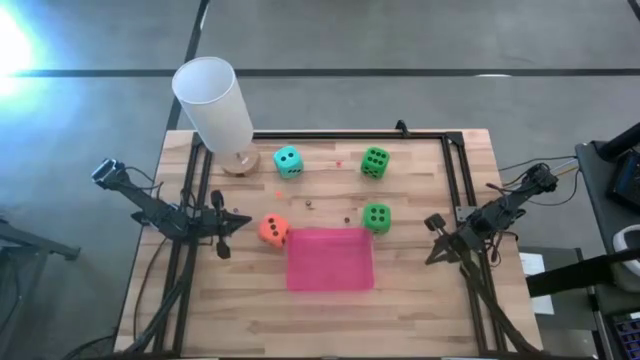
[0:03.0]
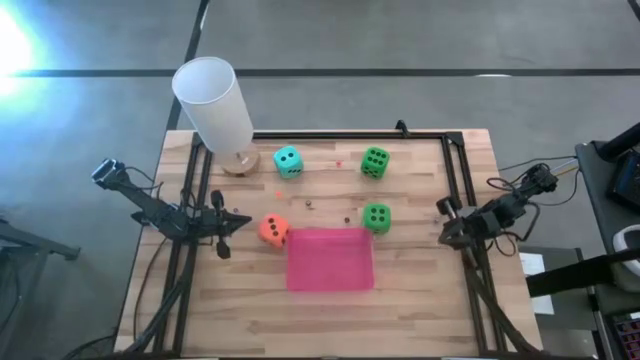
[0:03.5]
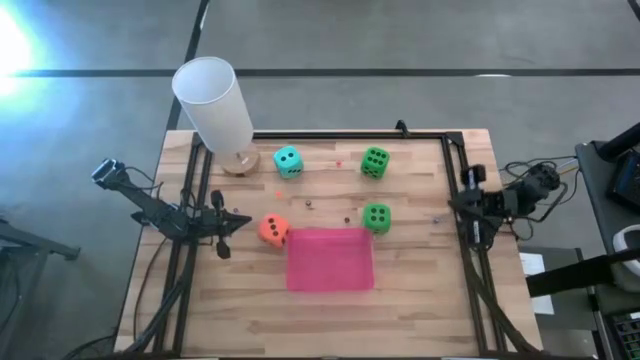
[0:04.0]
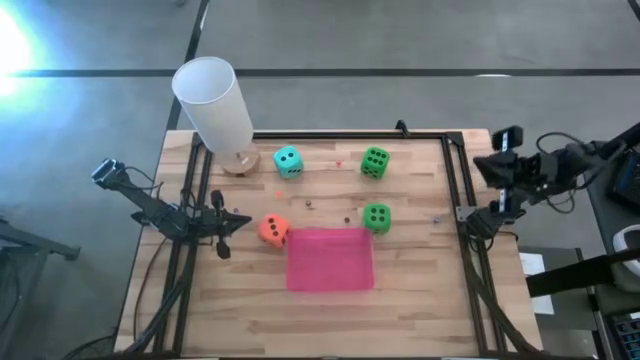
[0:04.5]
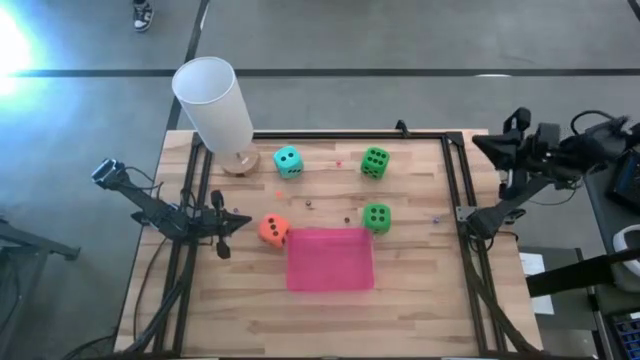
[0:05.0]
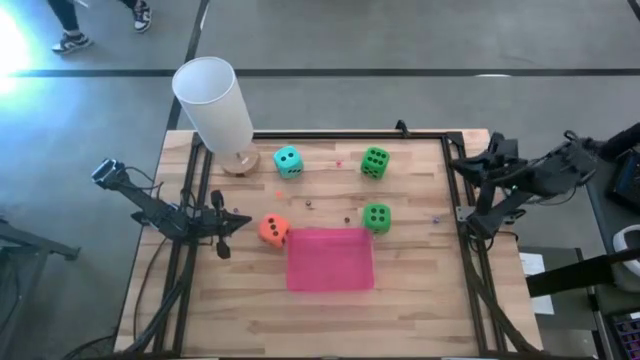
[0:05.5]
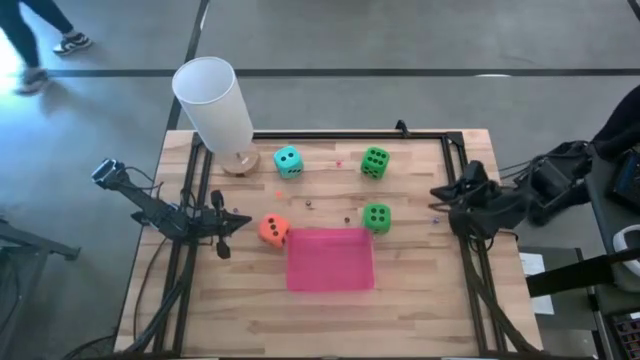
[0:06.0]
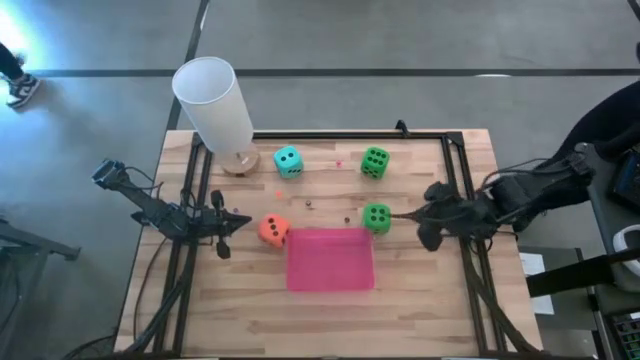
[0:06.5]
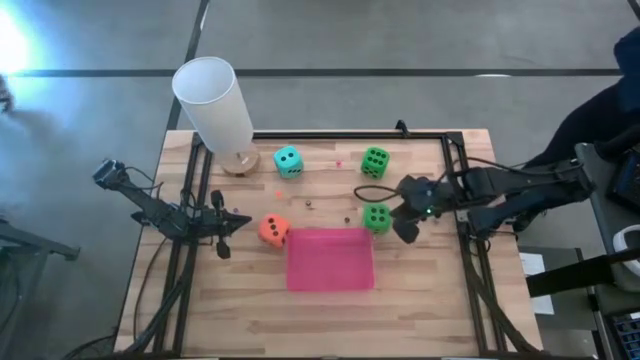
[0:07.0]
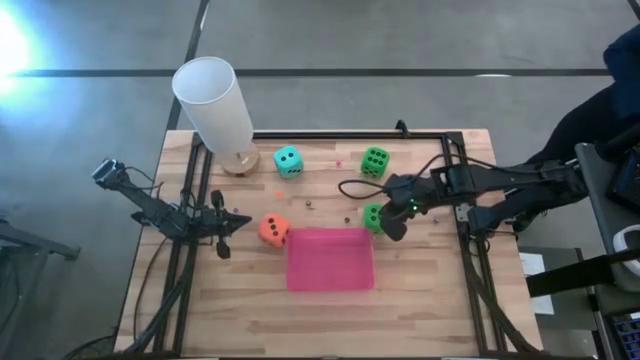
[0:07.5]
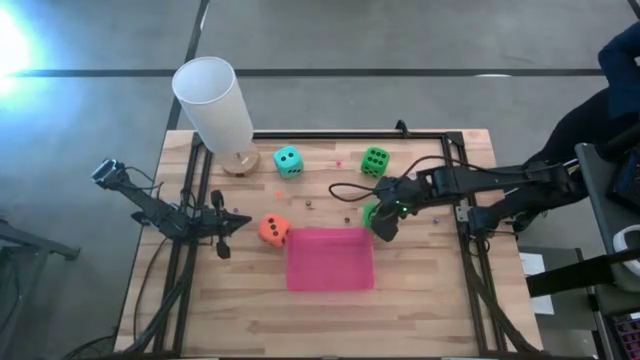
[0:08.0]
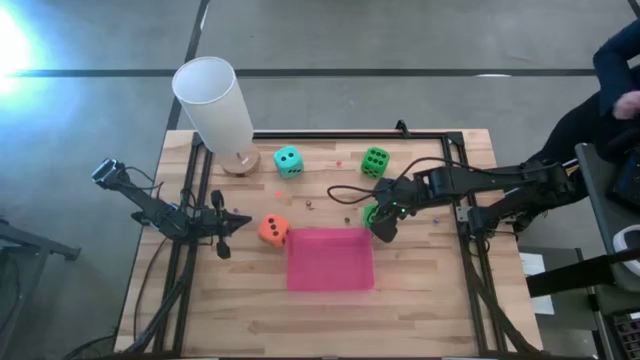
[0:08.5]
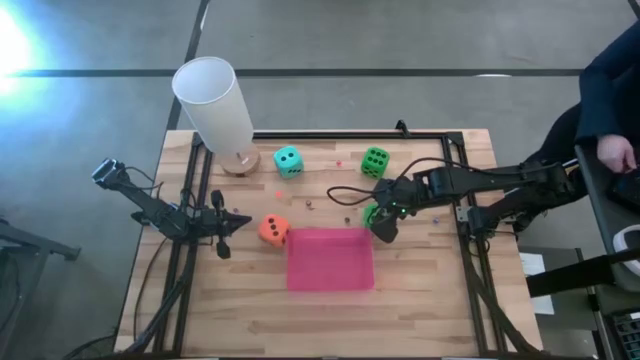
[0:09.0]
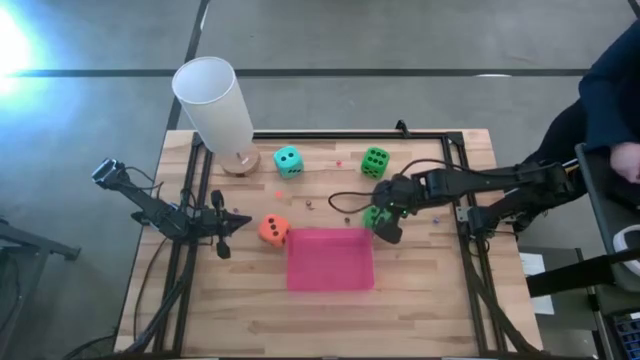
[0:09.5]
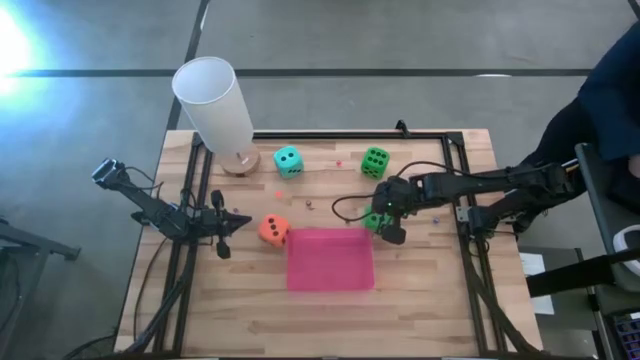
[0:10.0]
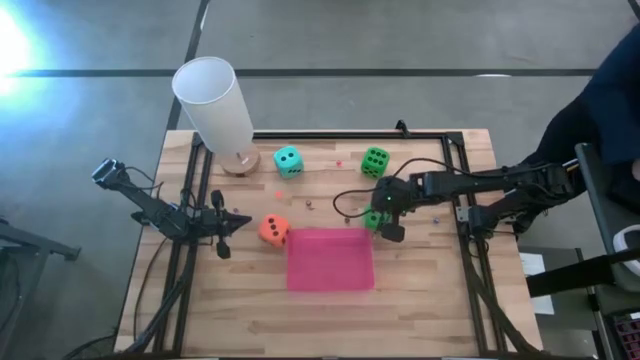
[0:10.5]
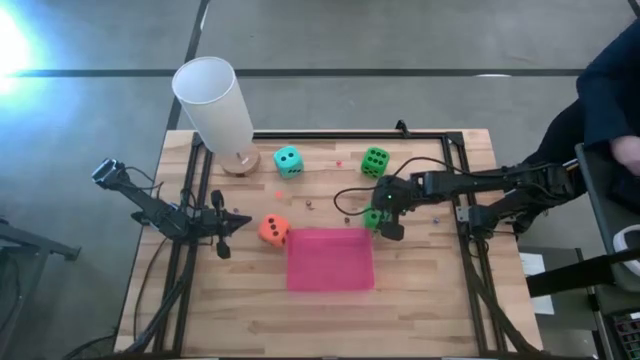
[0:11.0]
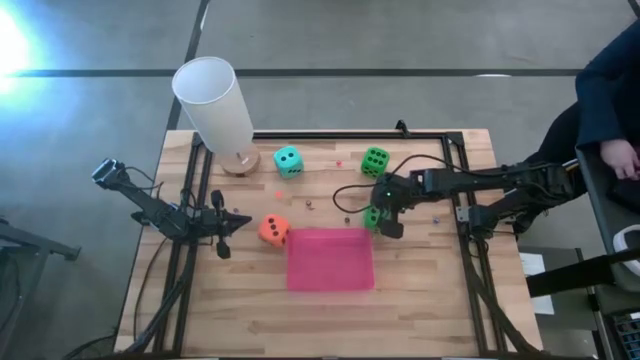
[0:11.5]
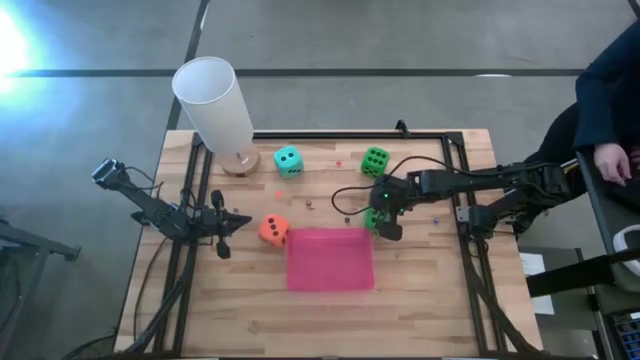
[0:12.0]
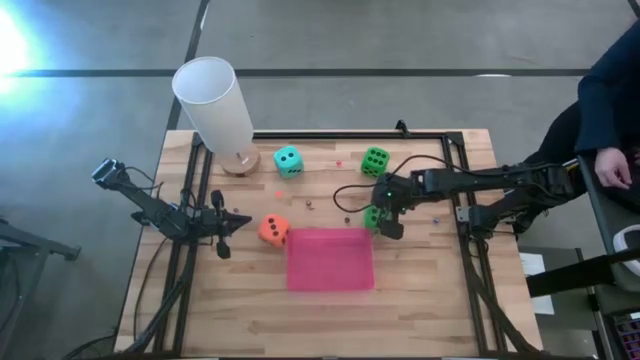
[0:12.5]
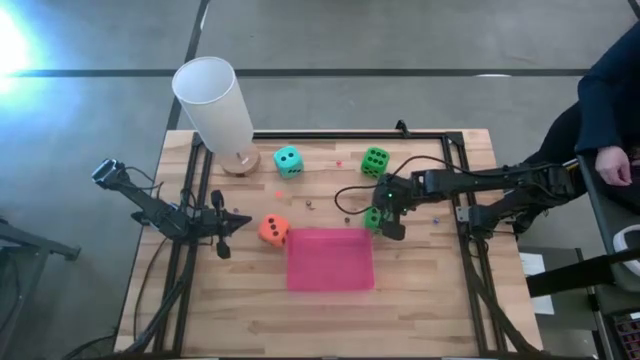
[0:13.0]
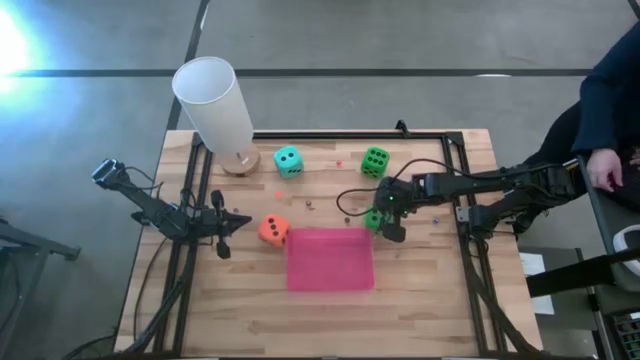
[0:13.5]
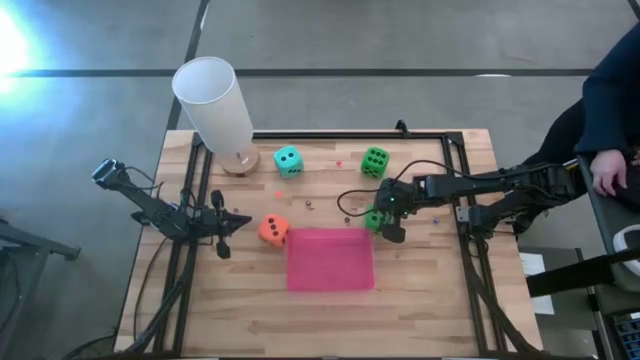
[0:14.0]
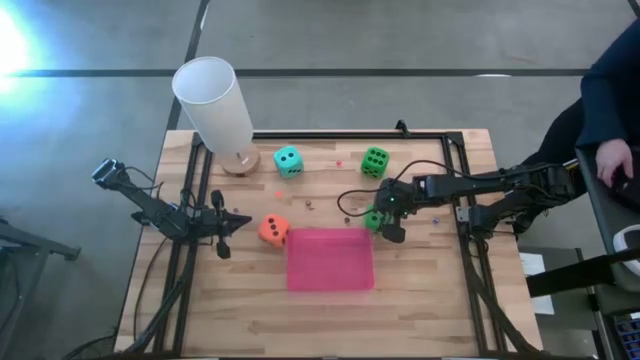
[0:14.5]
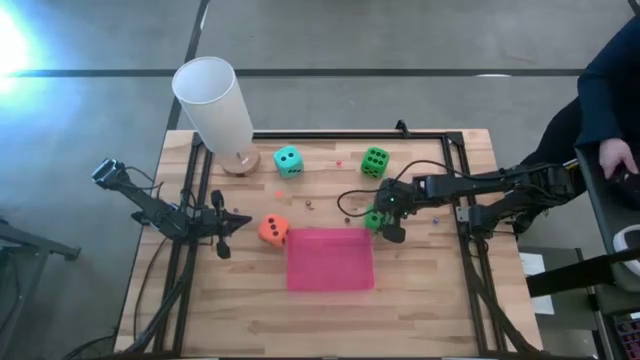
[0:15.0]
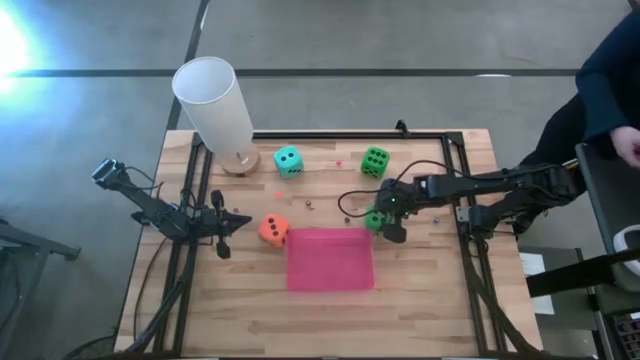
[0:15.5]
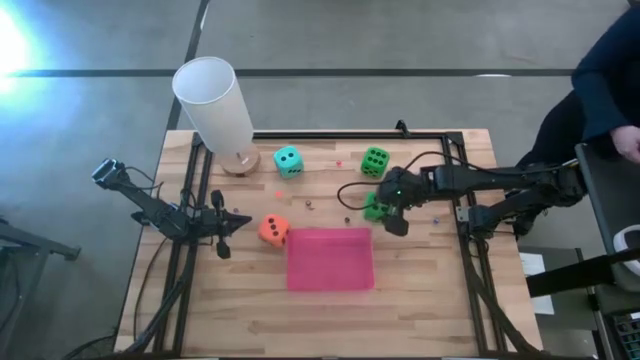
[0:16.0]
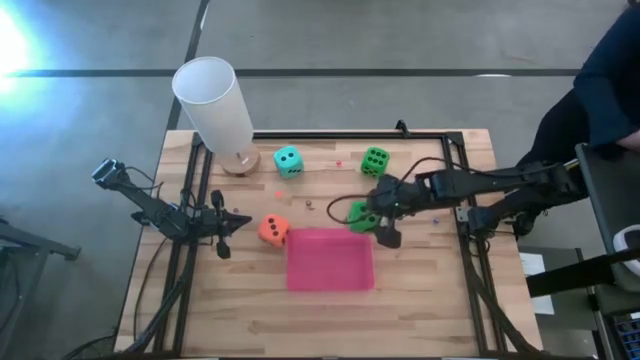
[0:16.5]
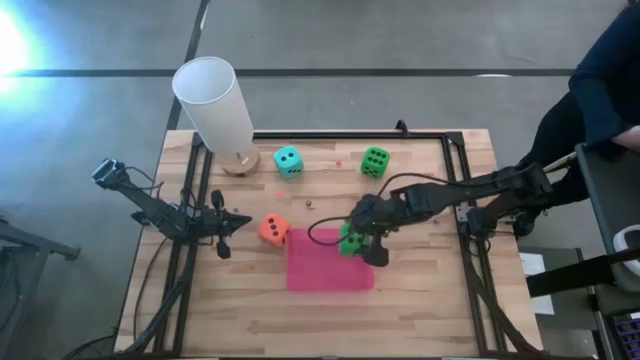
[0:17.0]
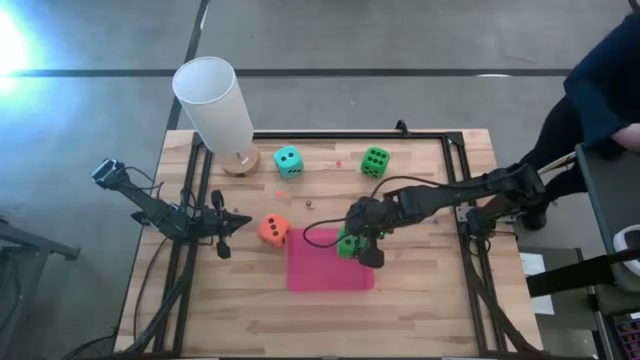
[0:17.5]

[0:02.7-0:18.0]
Task: Pick & Place Dice
Put the bottom large green dice into the pink bin

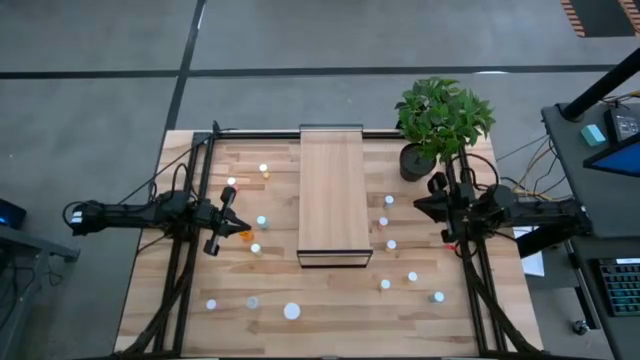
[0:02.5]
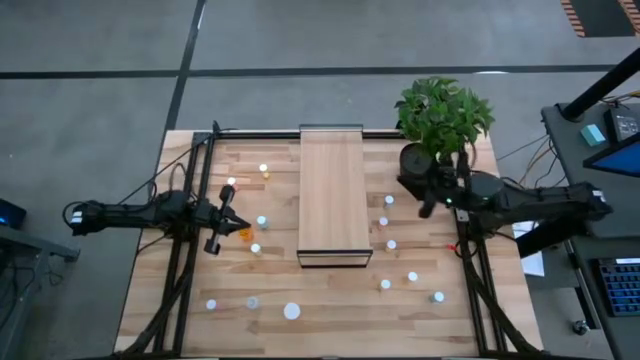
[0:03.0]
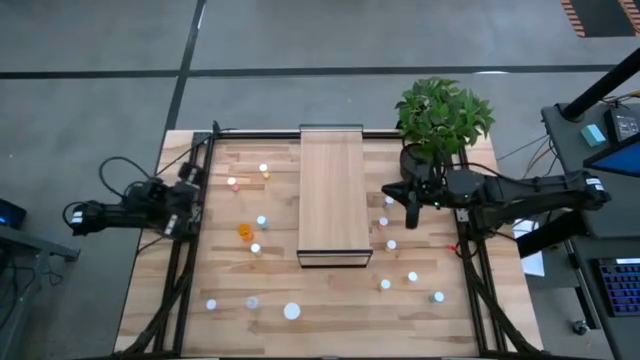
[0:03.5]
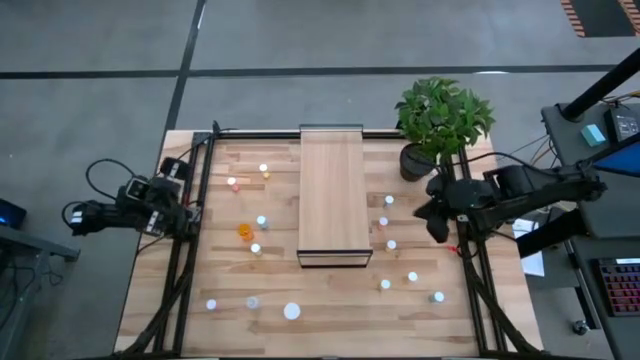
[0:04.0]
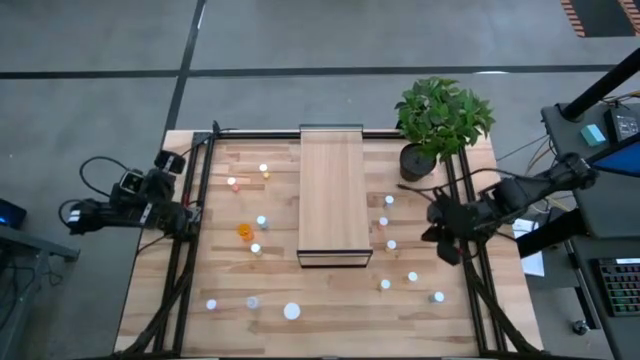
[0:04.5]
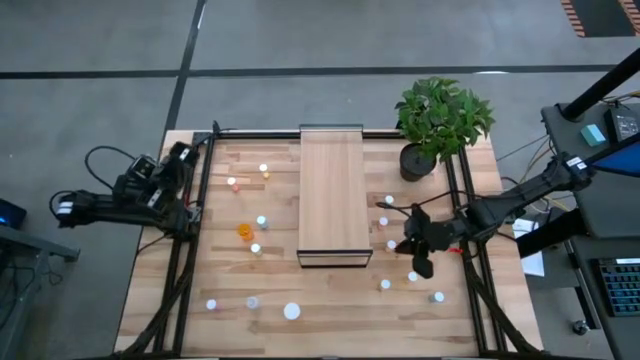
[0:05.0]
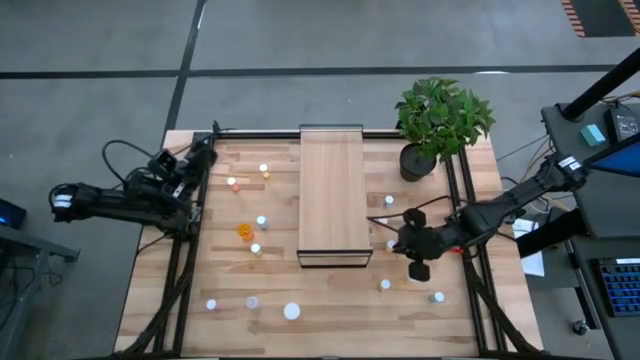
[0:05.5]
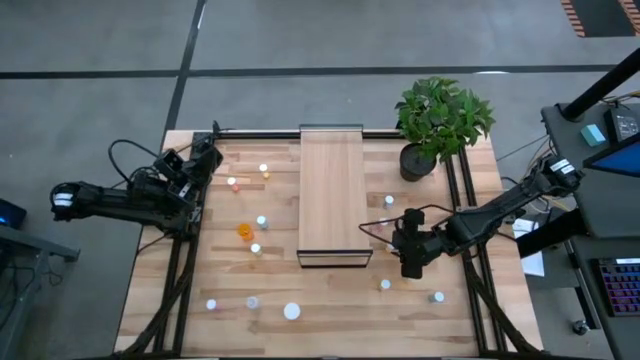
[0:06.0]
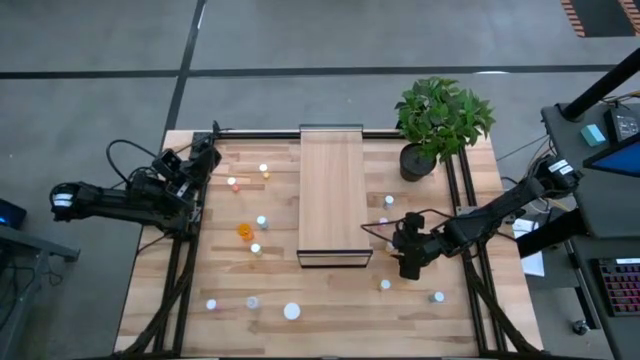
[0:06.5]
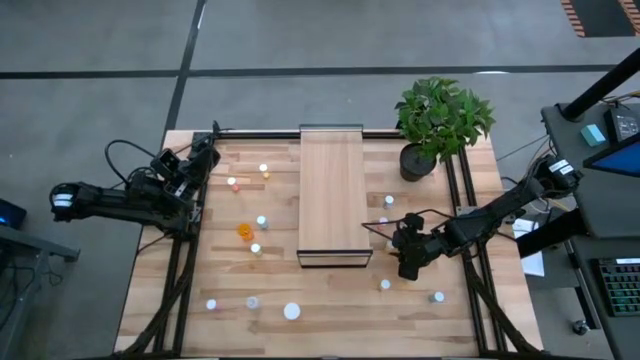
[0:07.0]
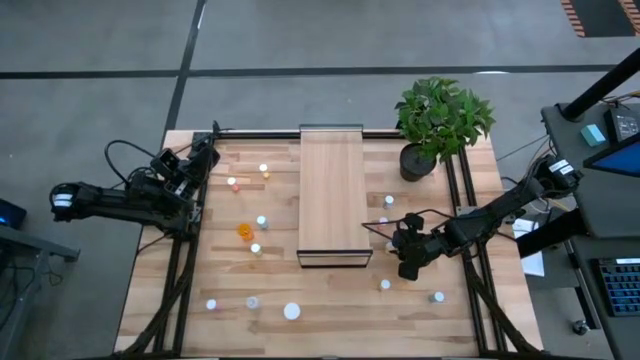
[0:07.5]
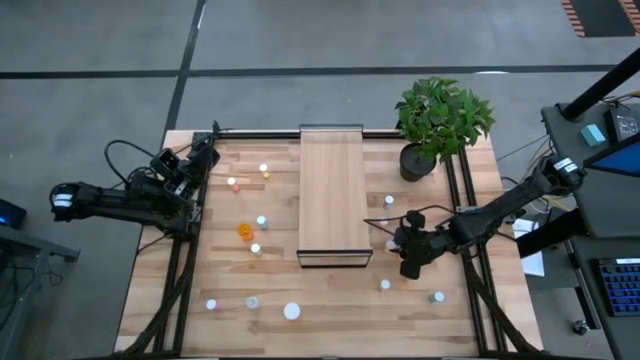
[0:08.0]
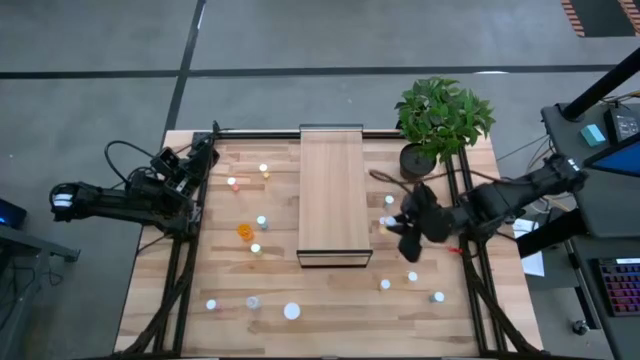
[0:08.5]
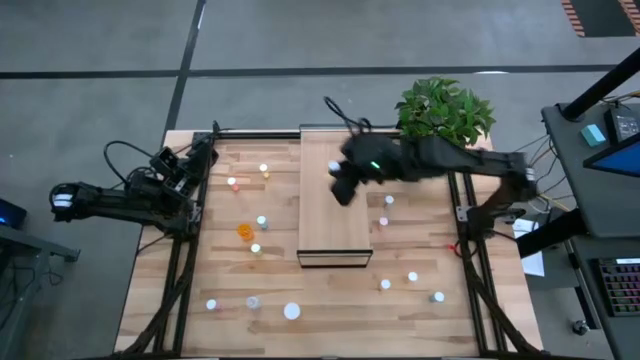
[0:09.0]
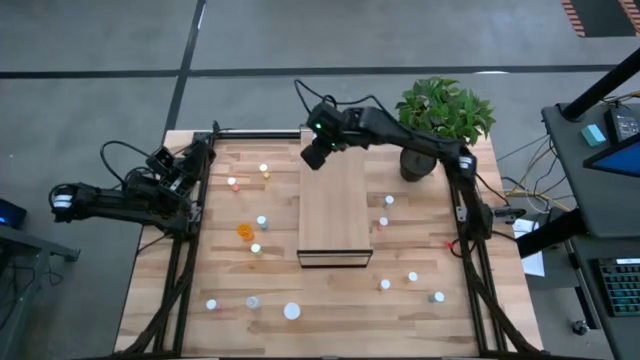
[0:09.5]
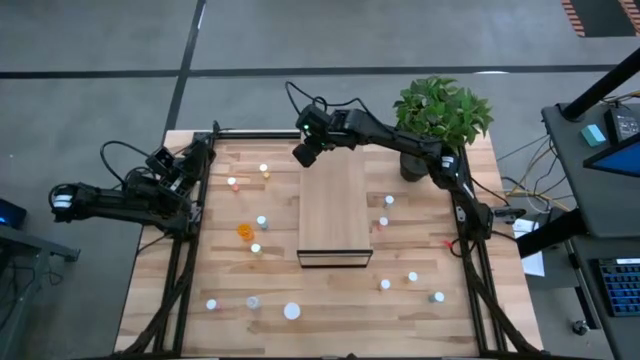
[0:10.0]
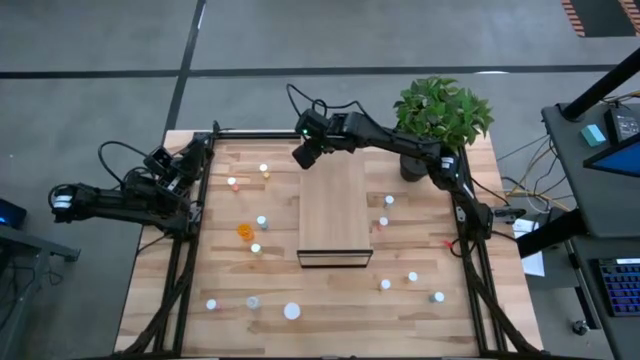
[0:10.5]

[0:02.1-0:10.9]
Task: Pick and place medicine bottles onto shelf by color
Put the middle right yellow bottle on the shelf
